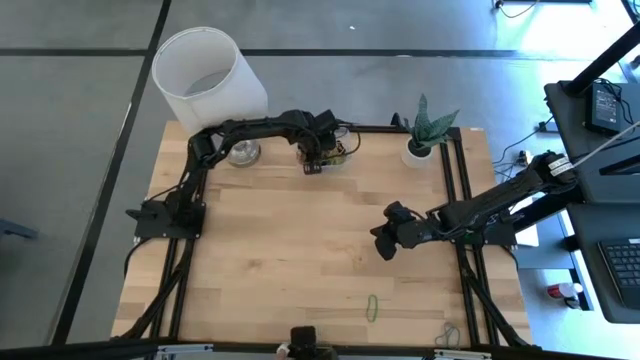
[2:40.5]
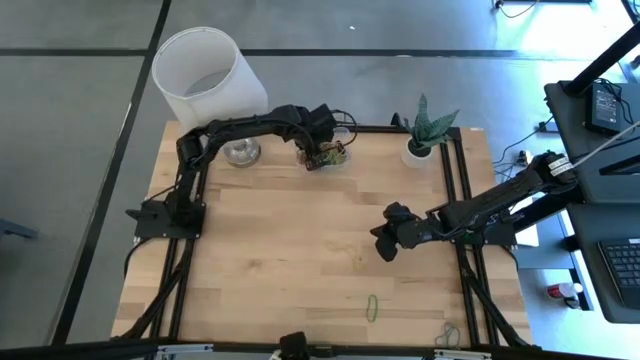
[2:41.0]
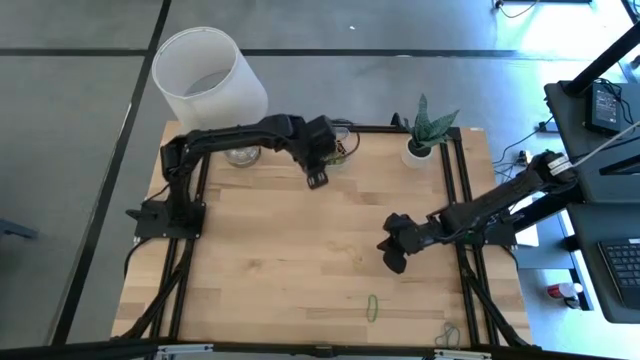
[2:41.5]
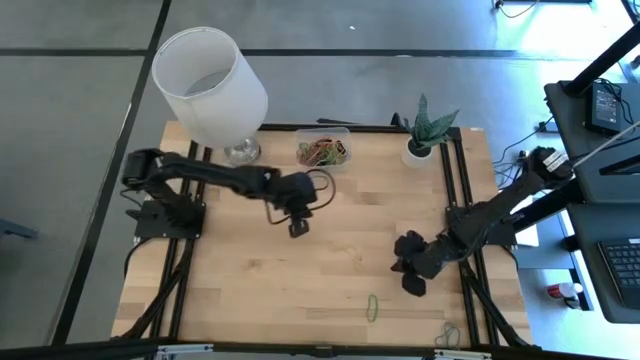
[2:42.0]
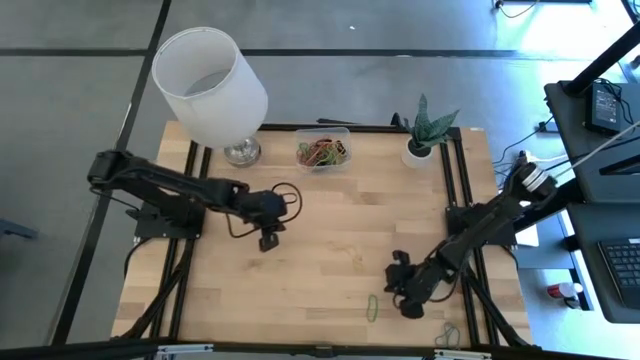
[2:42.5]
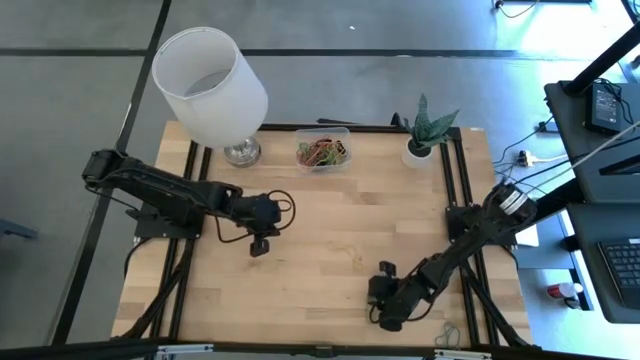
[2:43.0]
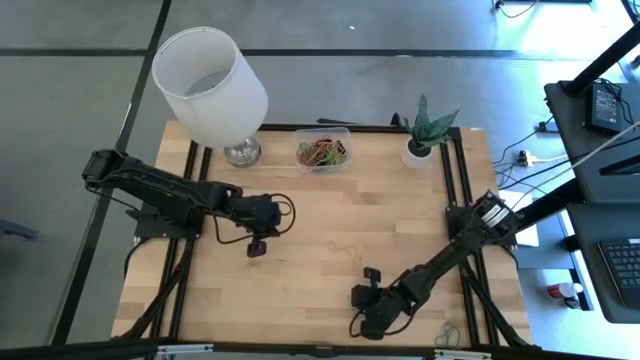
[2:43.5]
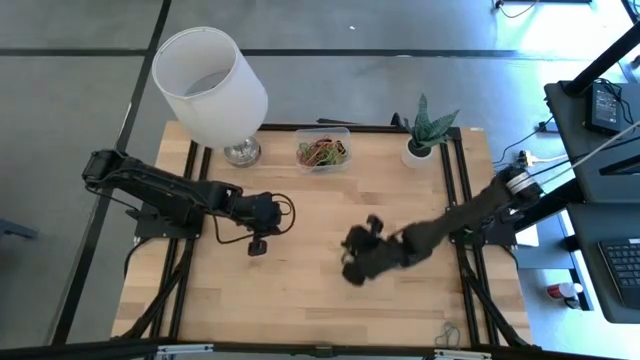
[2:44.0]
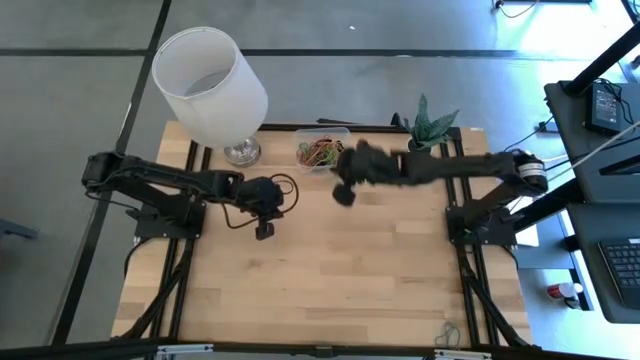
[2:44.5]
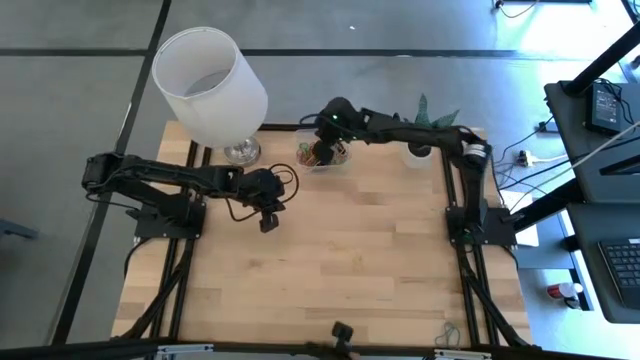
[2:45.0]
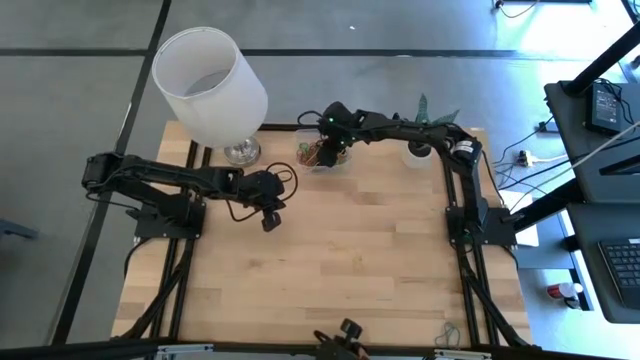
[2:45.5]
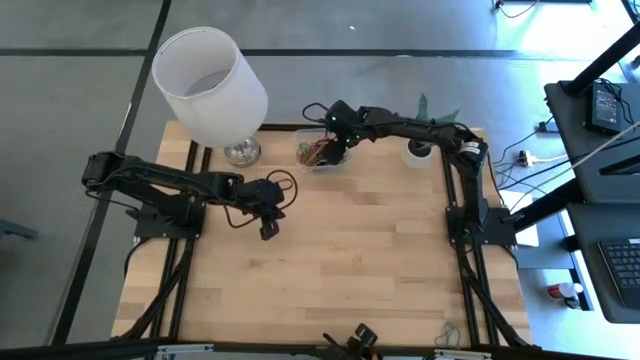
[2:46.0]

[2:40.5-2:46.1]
Task: Pick and place rubber bands into bin
Put the green rubber band into the transparent bin

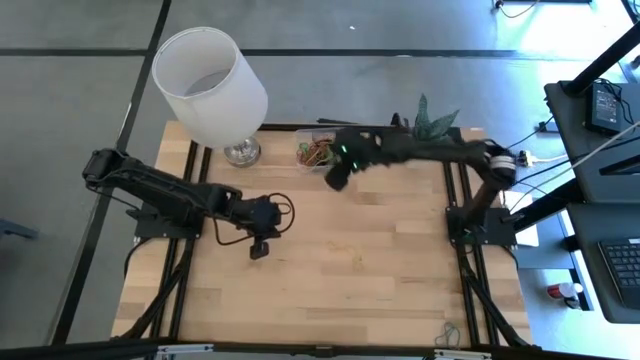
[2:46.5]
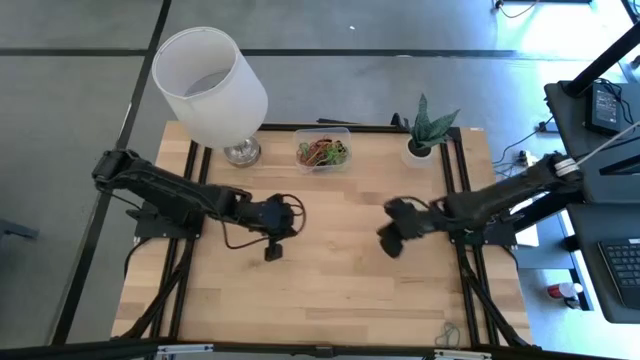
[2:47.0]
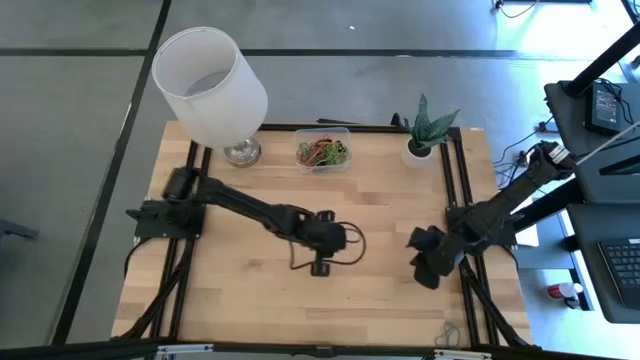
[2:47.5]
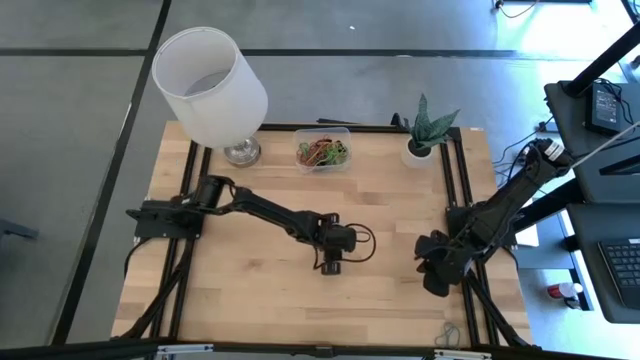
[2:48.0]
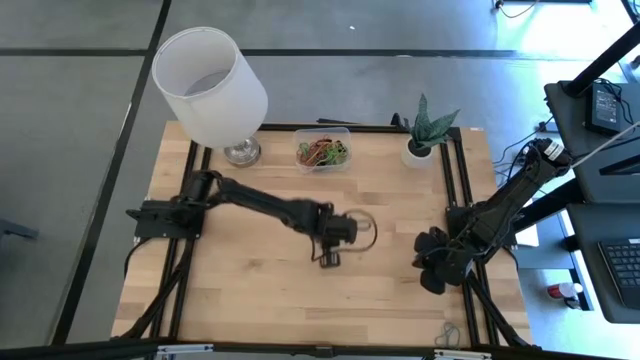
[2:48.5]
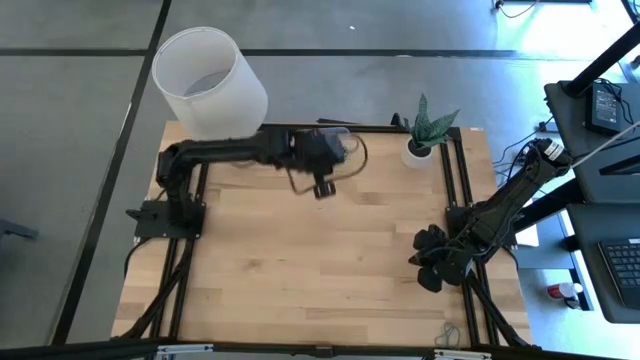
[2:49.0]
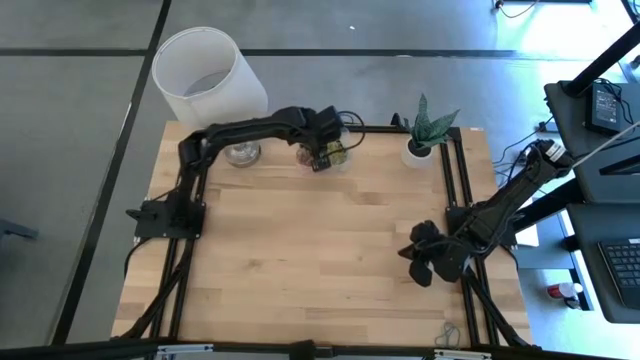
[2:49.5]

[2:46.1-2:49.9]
Put the yellow rubber band into the transparent bin

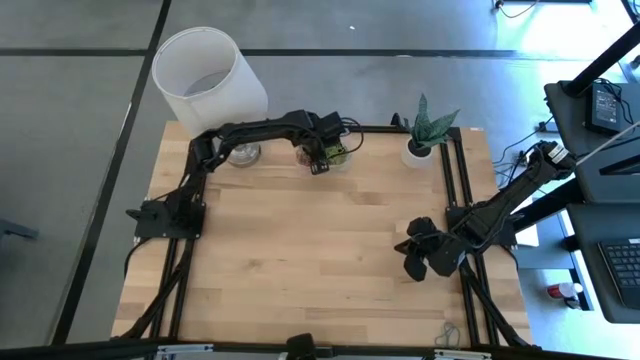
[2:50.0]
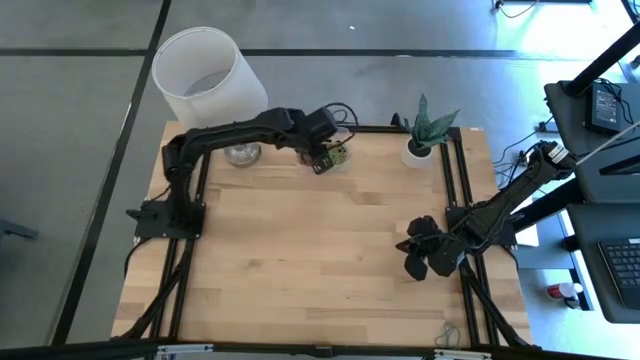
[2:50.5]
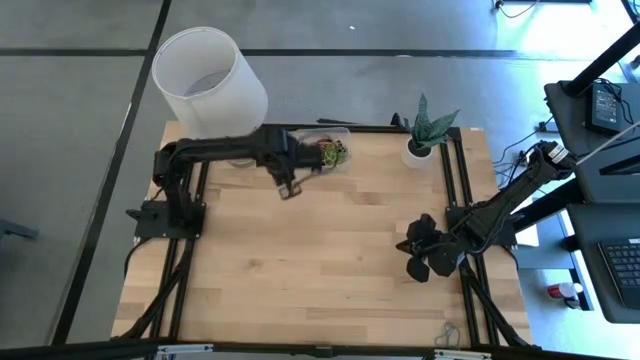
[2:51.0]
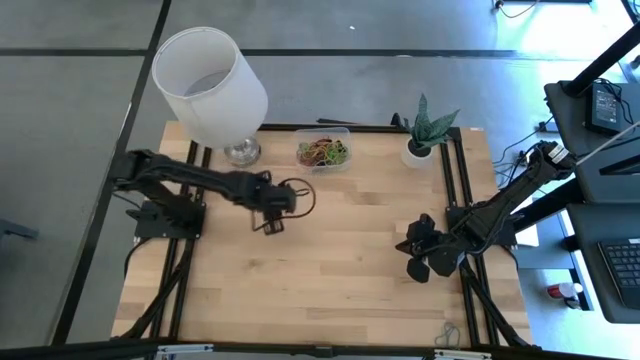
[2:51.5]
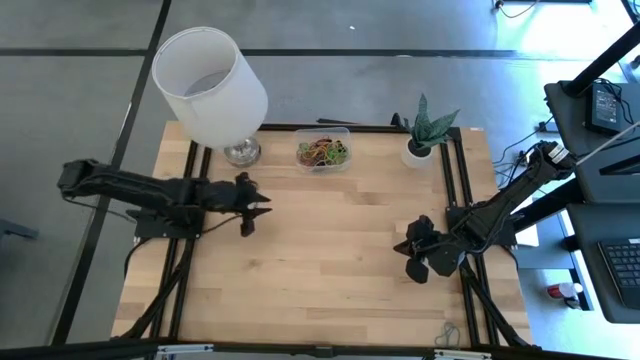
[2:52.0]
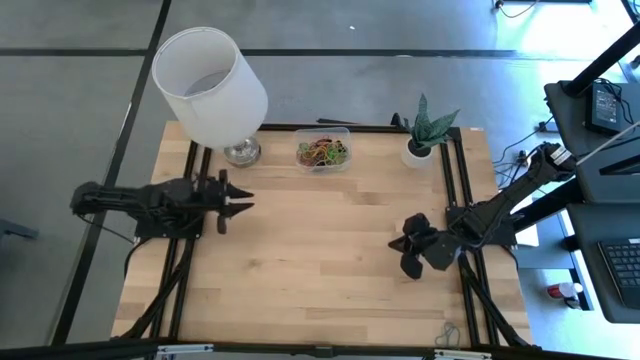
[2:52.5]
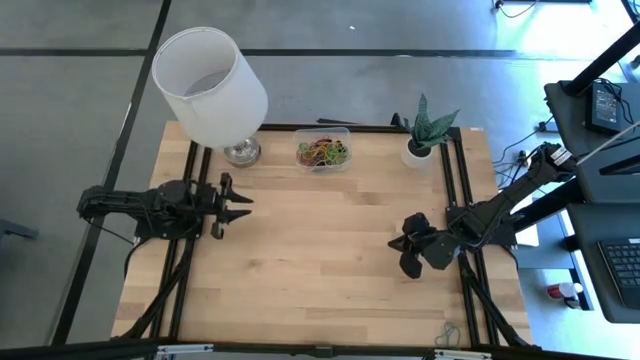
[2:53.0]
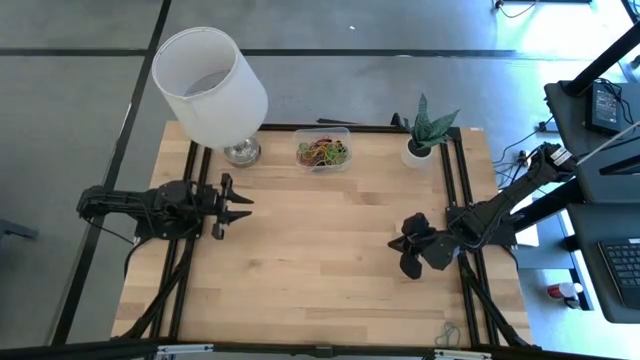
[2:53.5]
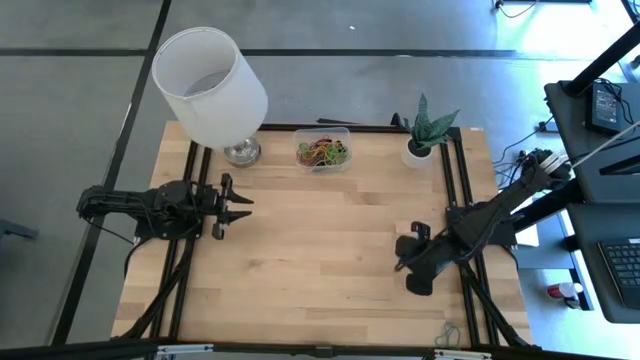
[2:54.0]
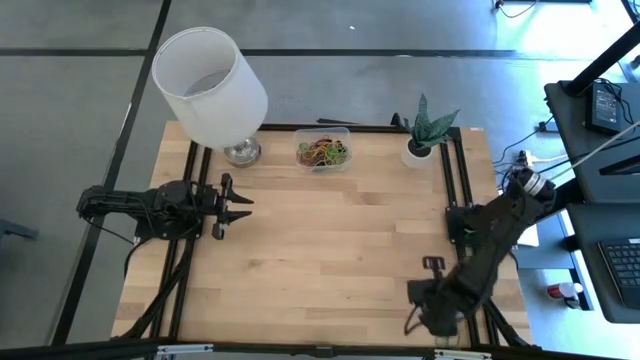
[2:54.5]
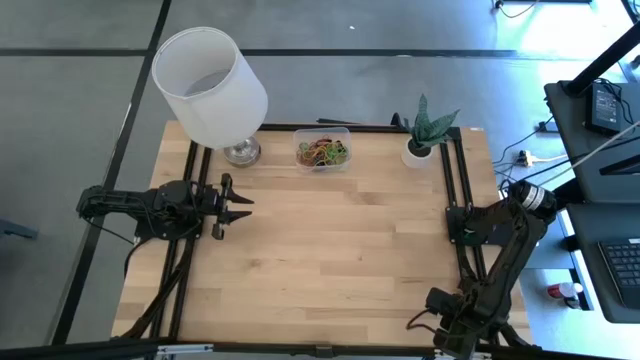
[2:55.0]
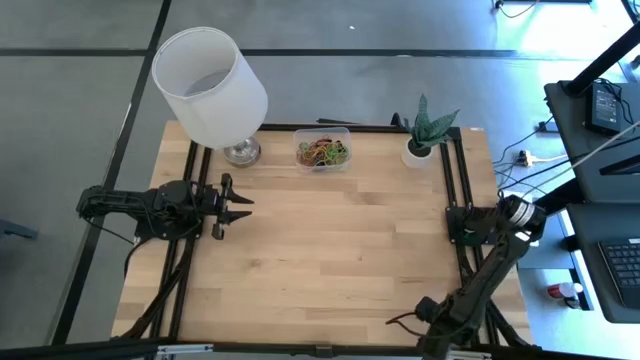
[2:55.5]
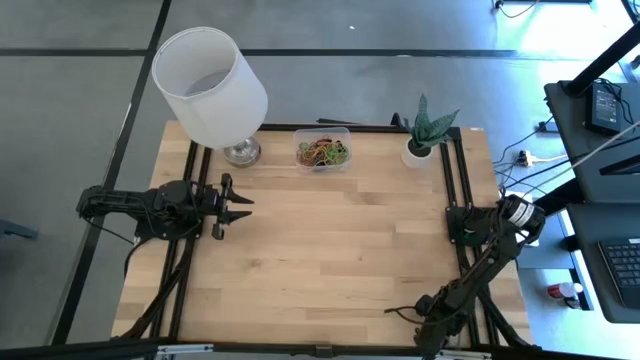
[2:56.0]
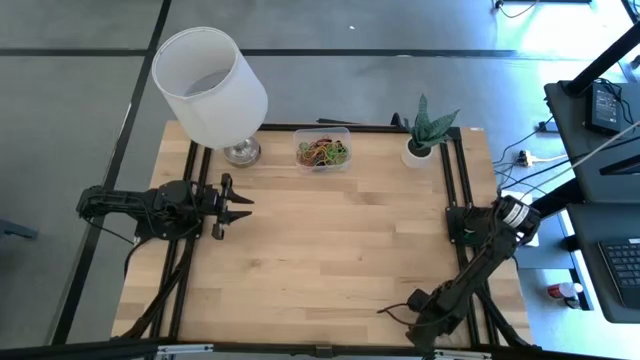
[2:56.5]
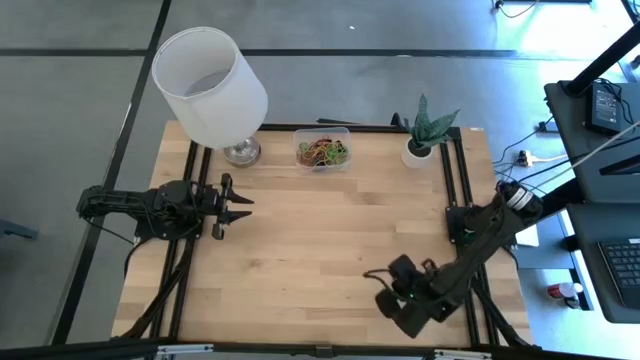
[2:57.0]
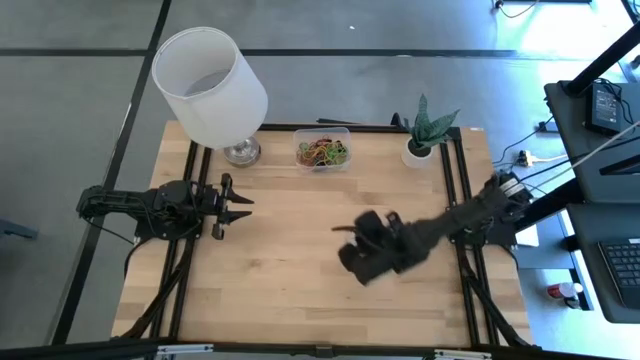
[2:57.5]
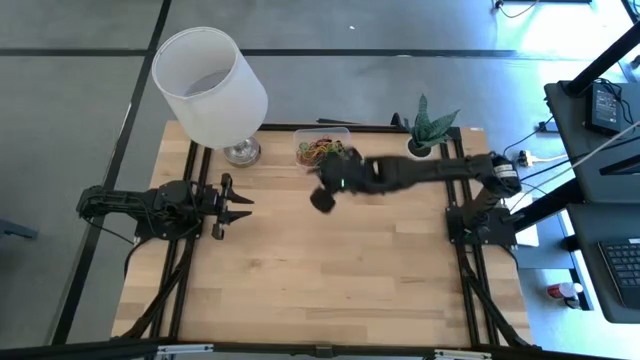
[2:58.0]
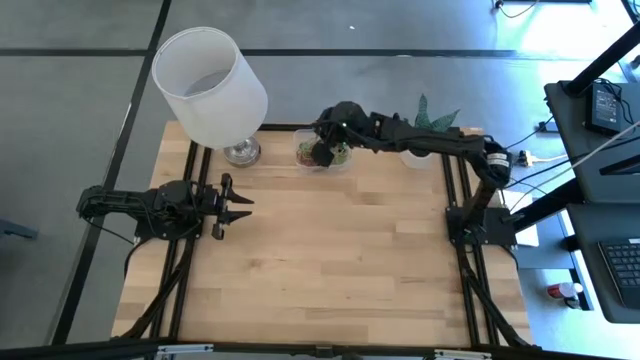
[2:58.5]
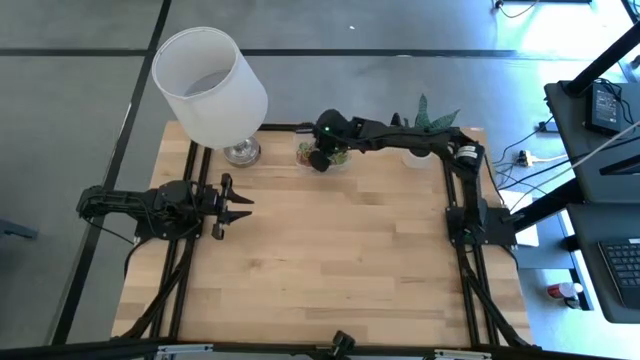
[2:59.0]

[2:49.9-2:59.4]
Put the blue rubber band into the transparent bin

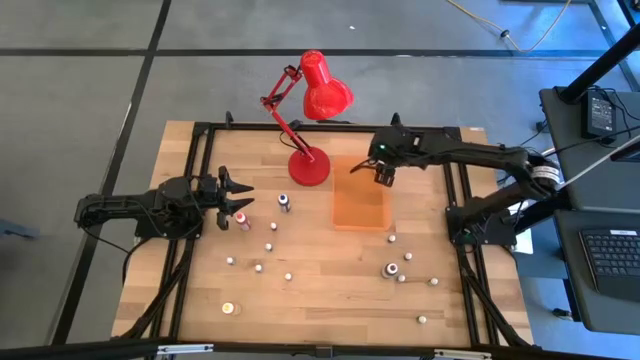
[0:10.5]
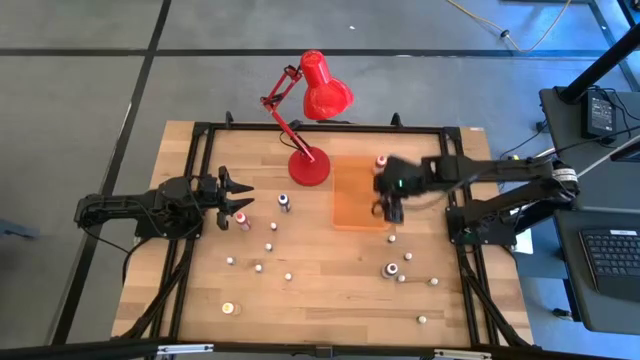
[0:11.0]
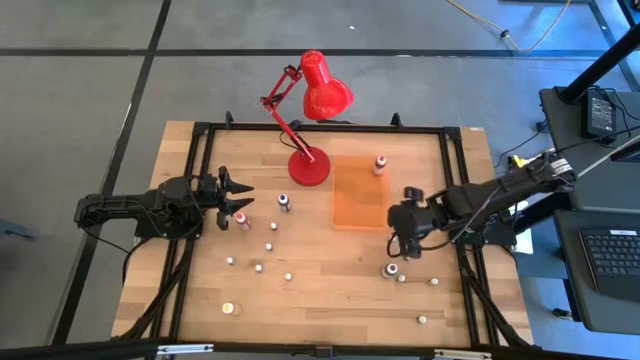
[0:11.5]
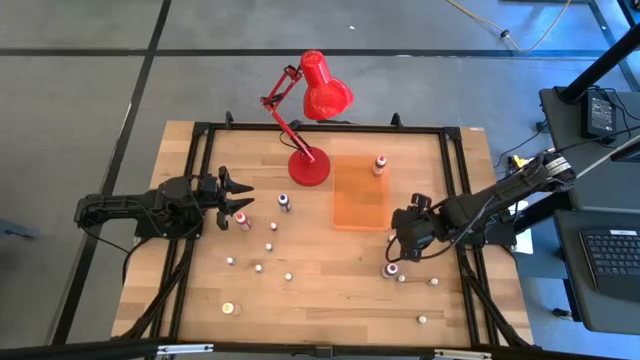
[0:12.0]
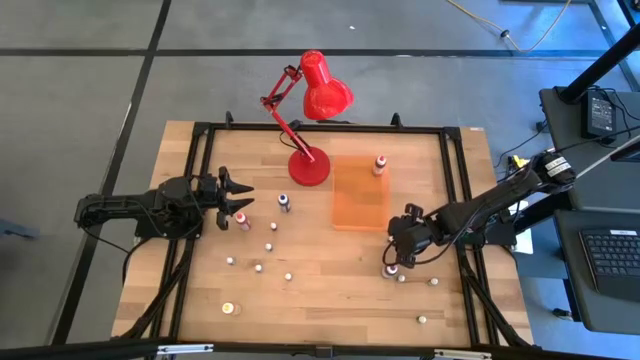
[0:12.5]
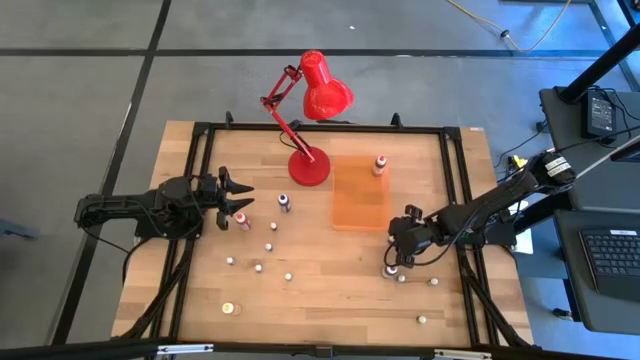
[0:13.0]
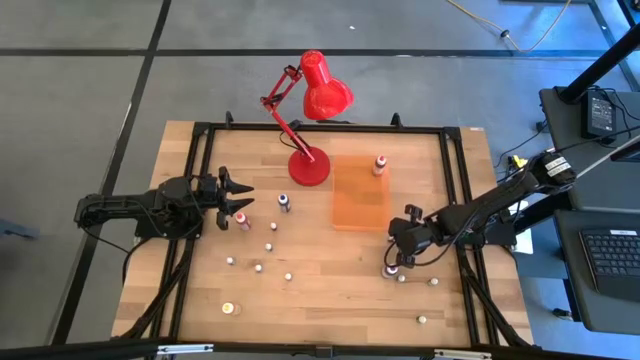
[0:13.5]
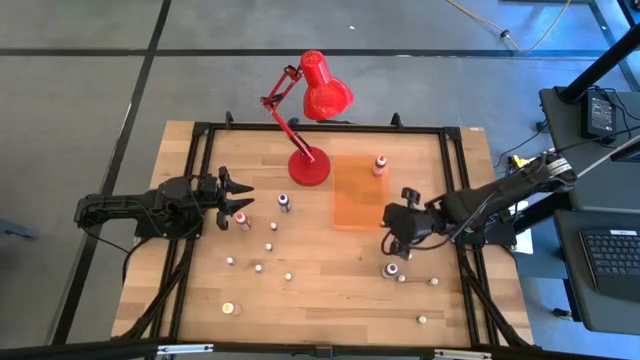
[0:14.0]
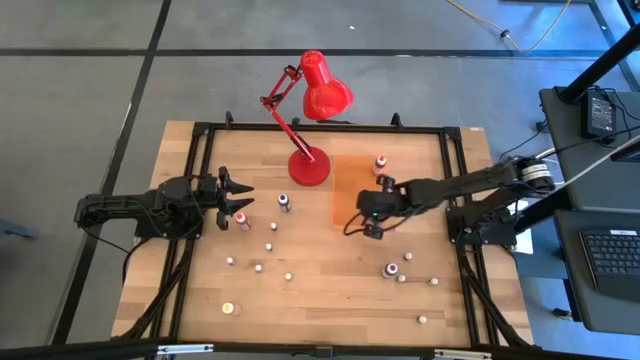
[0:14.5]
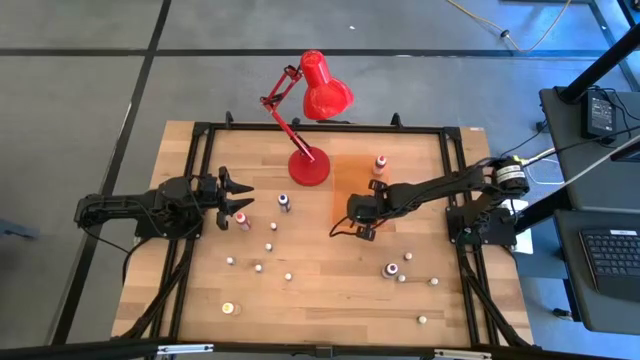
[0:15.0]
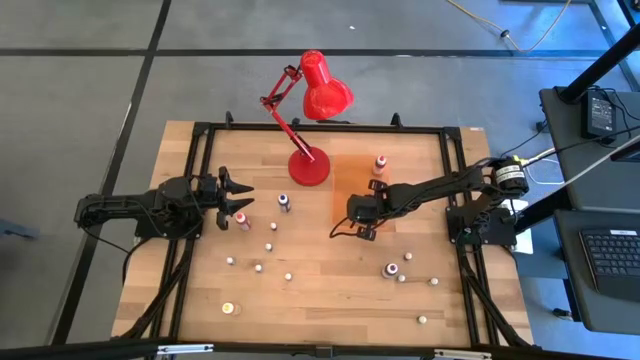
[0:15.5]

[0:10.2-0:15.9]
Task: Pick & Place food coloring
Put the right small red food coloring bottle into the orange bin
